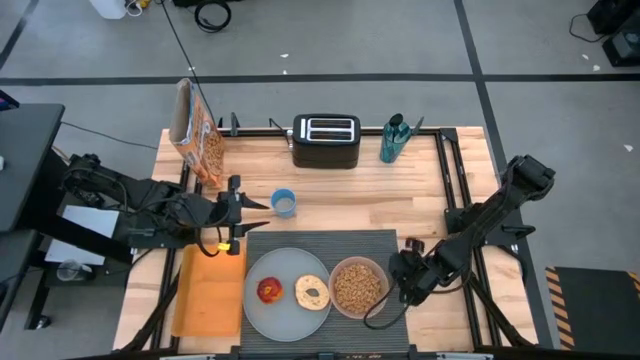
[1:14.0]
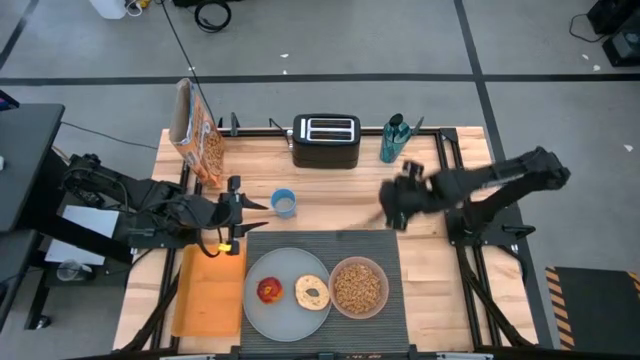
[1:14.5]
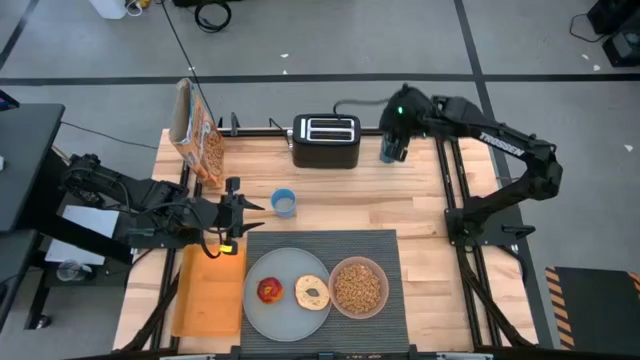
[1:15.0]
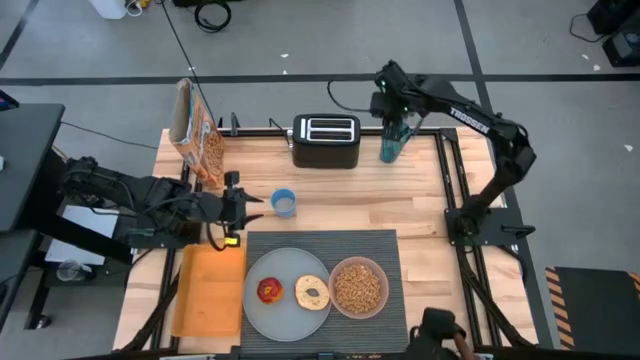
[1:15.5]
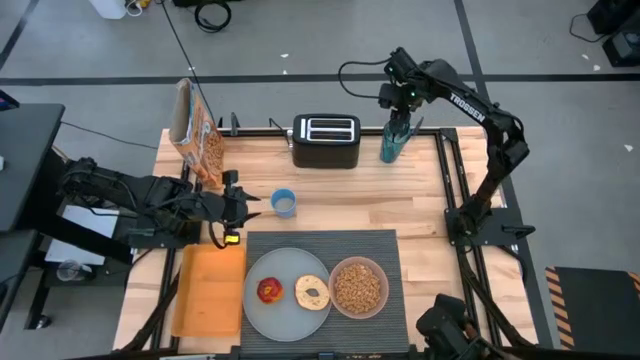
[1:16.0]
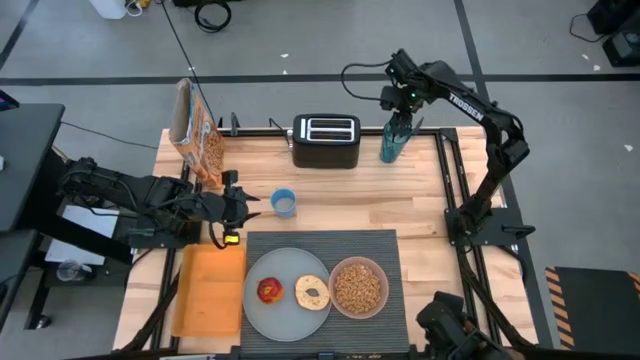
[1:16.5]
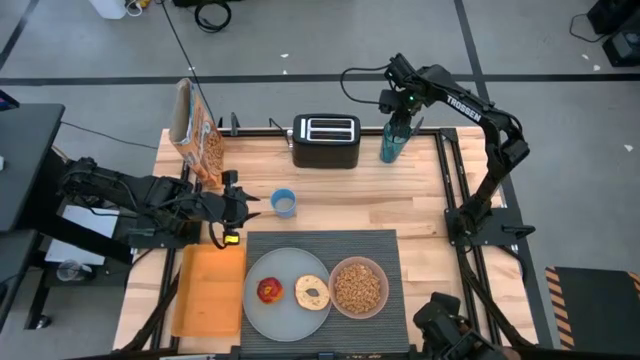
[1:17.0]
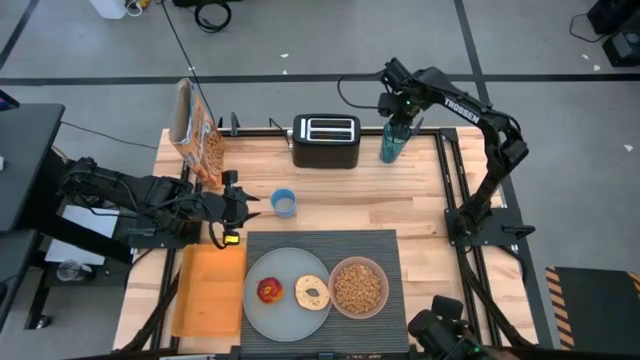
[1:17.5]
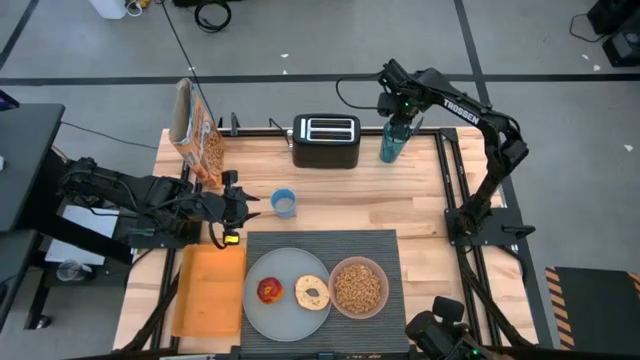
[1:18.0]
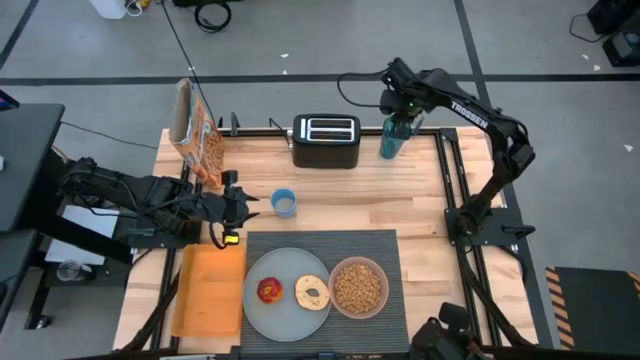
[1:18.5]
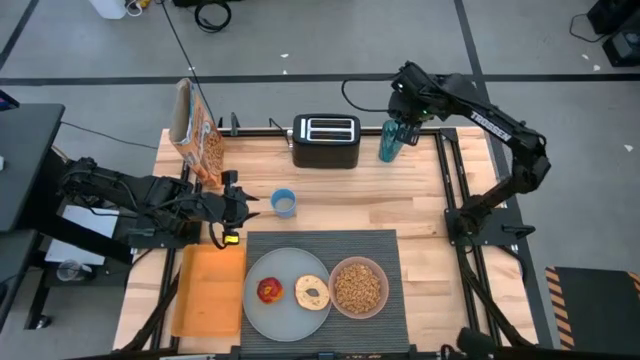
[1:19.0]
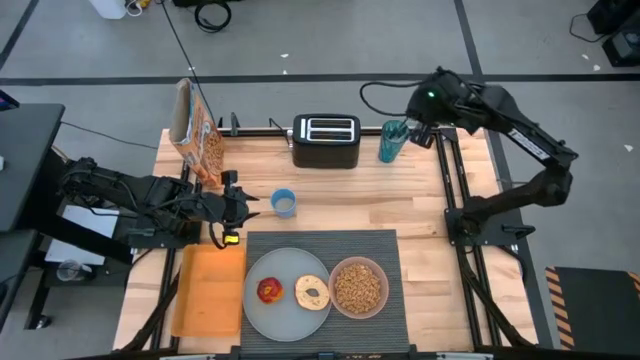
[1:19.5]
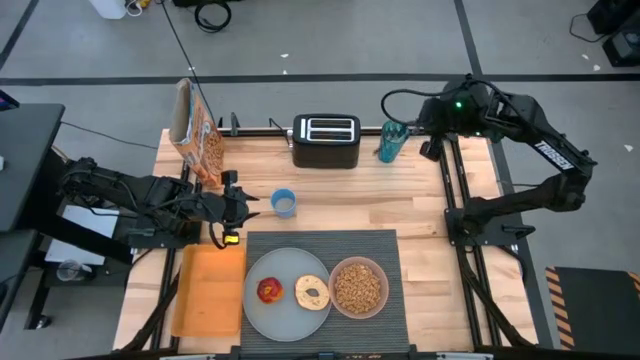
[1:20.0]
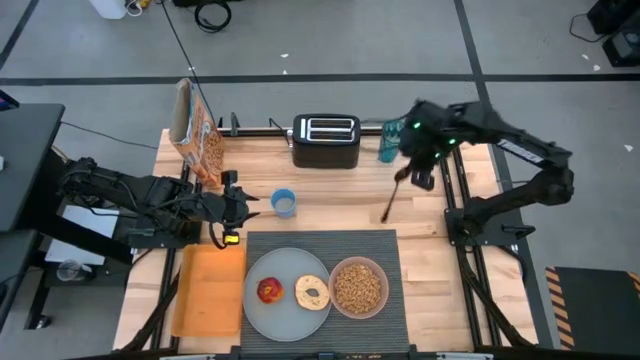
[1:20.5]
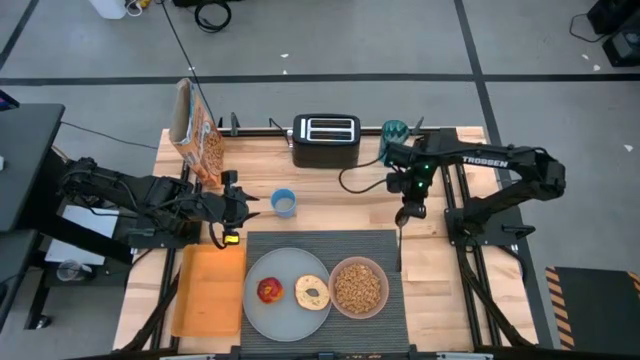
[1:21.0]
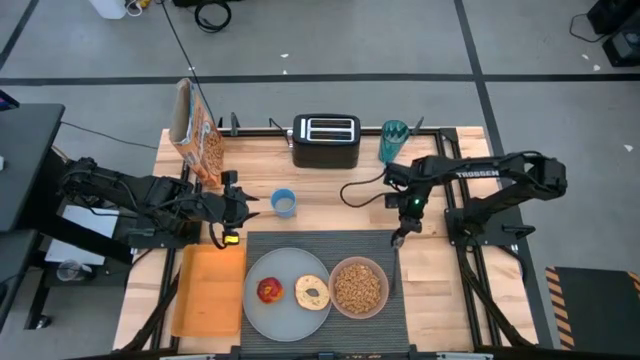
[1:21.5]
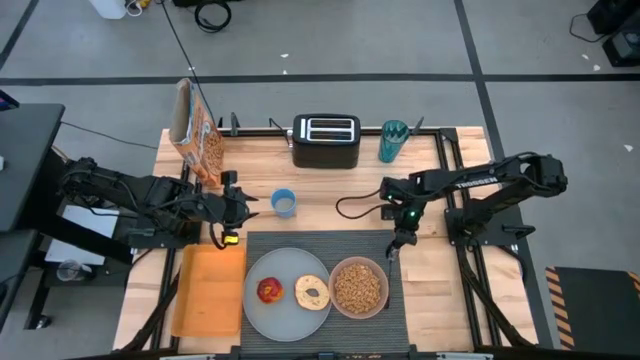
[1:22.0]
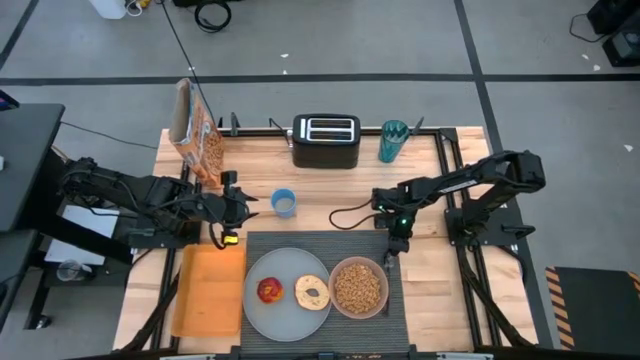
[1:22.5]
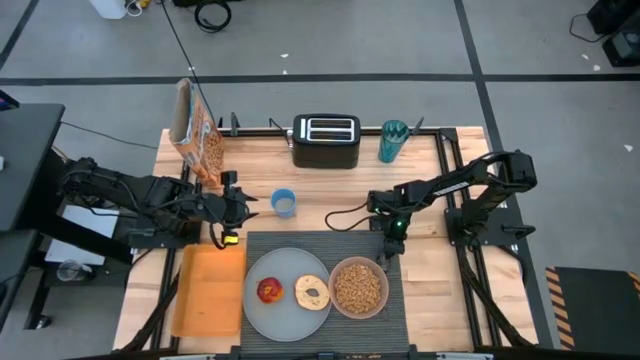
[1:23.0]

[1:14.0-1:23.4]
Task: Arrange a breakfast setting
Put the black spoon on the right of the gray table mat

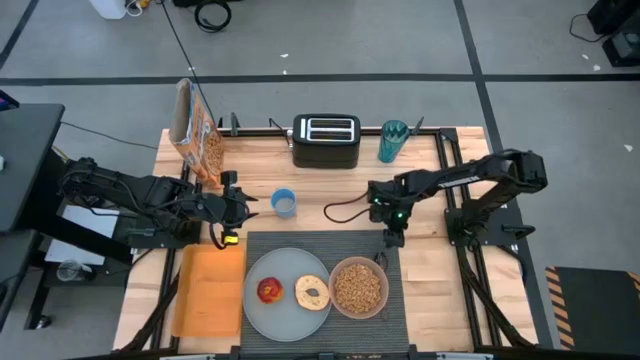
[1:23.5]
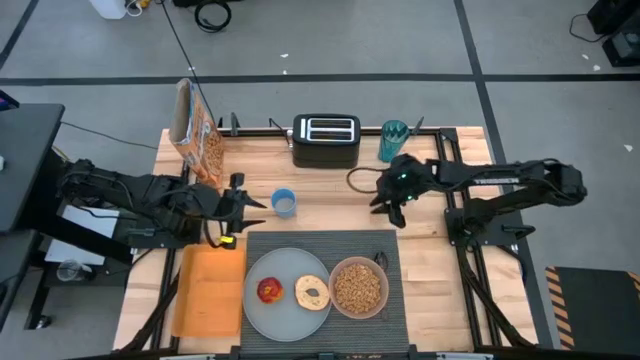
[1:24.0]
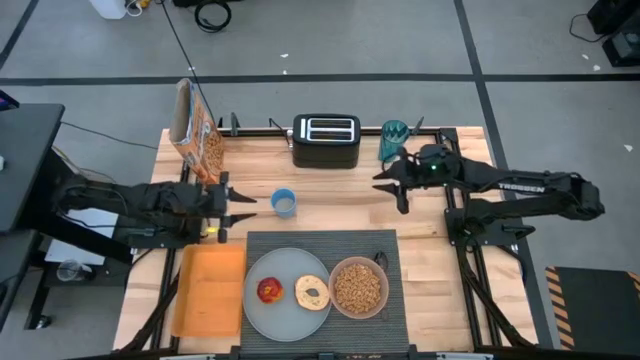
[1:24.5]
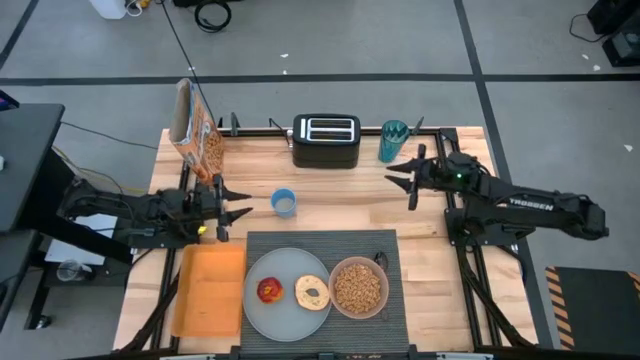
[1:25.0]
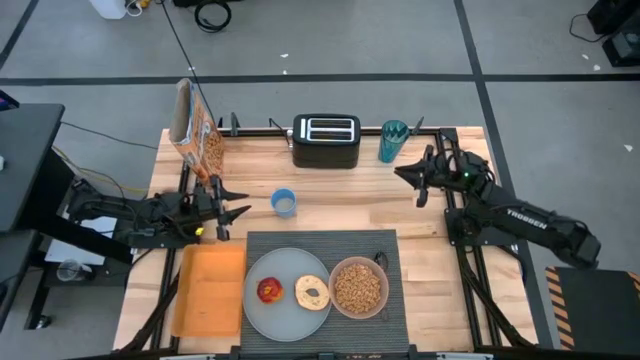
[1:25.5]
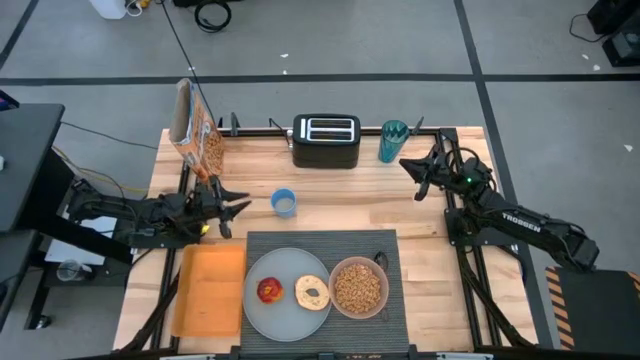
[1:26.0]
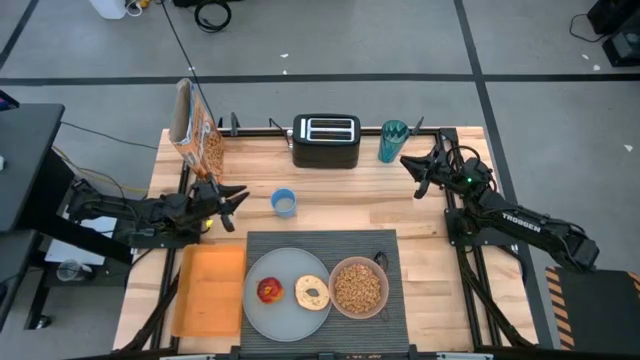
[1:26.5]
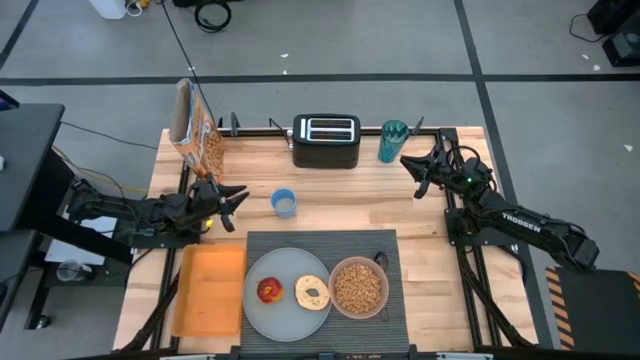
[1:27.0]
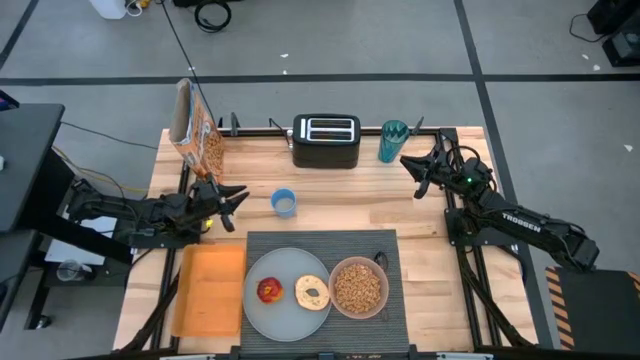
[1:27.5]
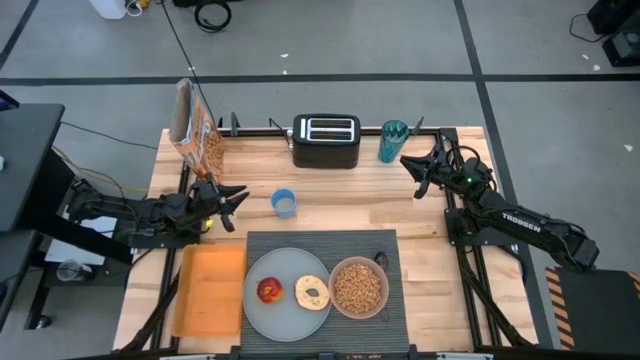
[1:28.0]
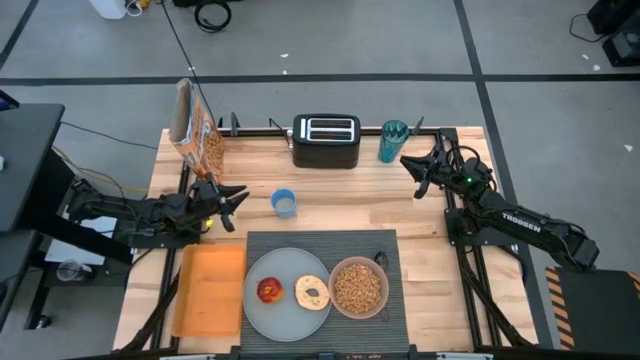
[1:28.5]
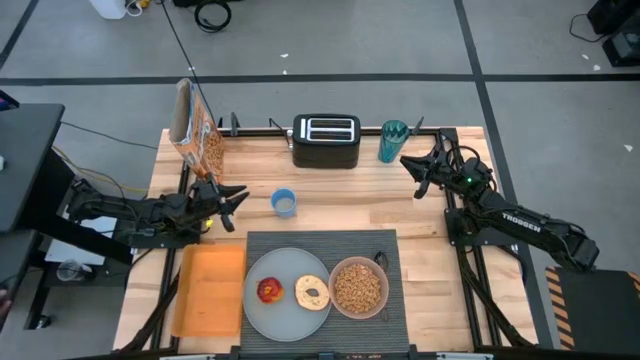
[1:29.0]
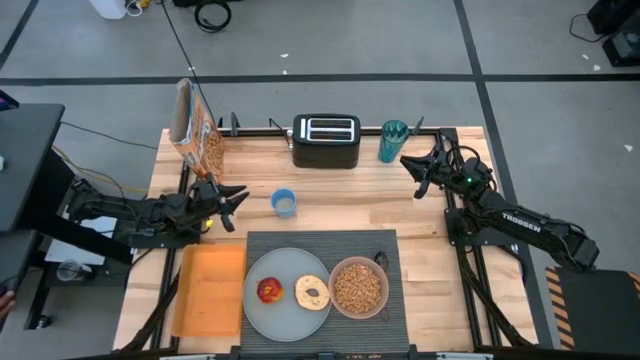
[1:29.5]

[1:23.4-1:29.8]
Return to Home Position

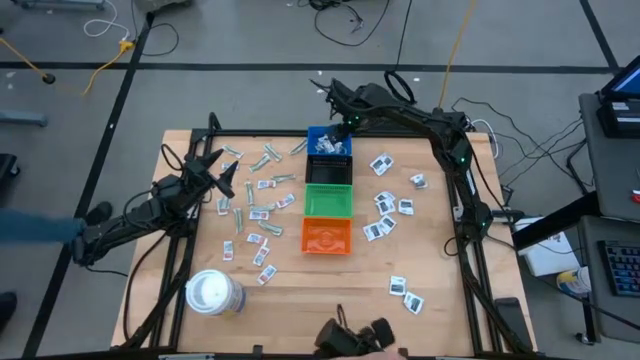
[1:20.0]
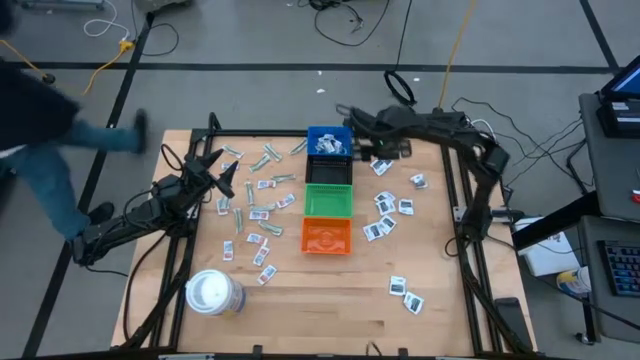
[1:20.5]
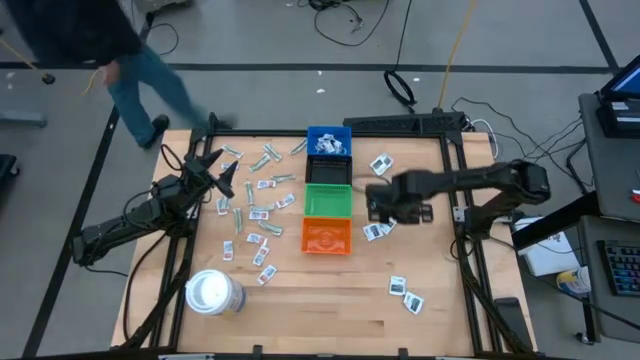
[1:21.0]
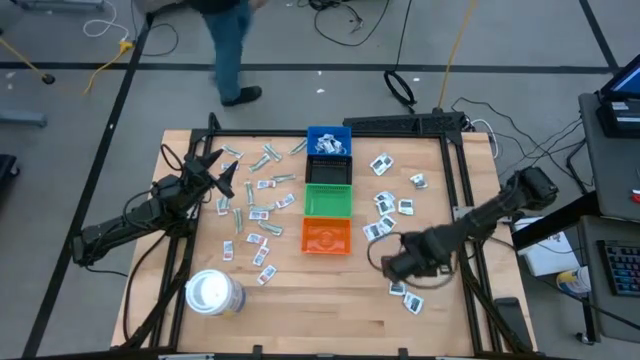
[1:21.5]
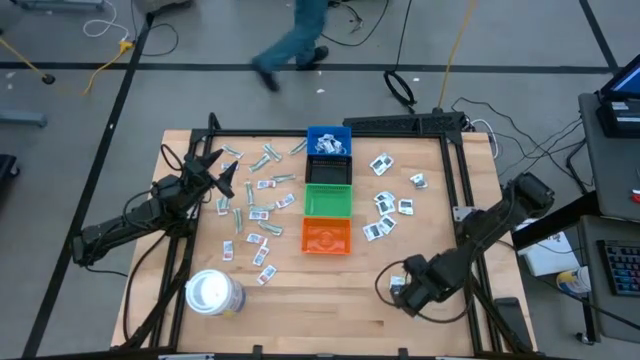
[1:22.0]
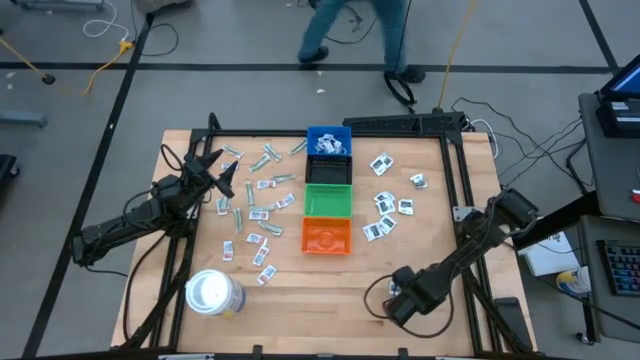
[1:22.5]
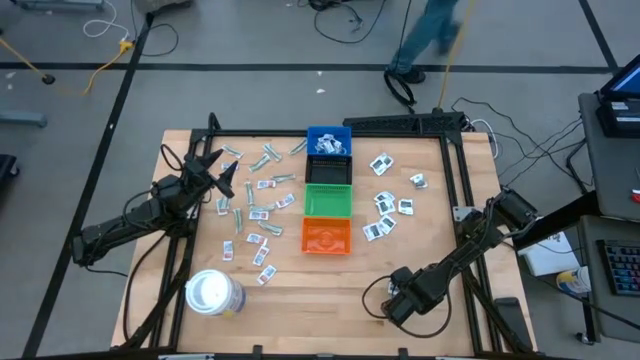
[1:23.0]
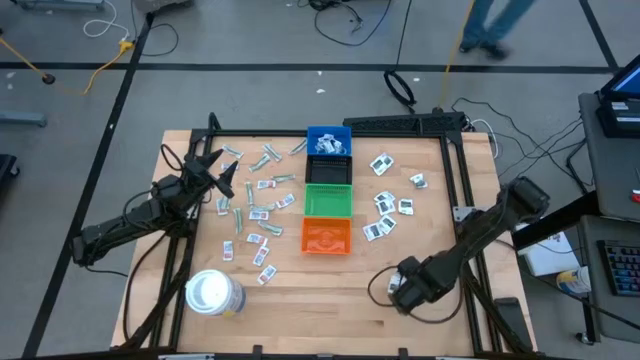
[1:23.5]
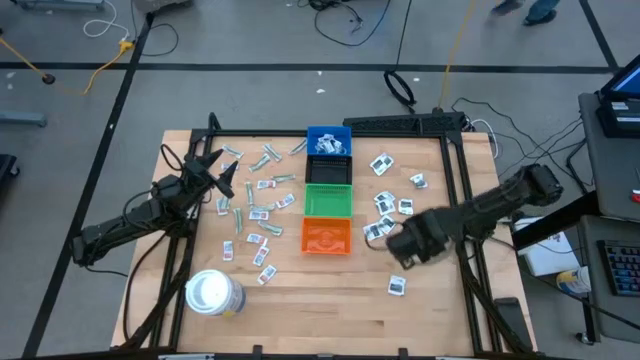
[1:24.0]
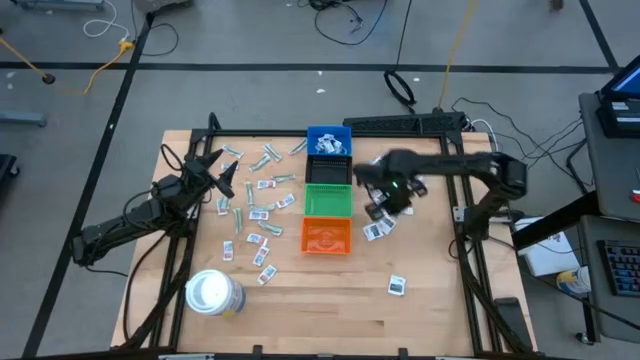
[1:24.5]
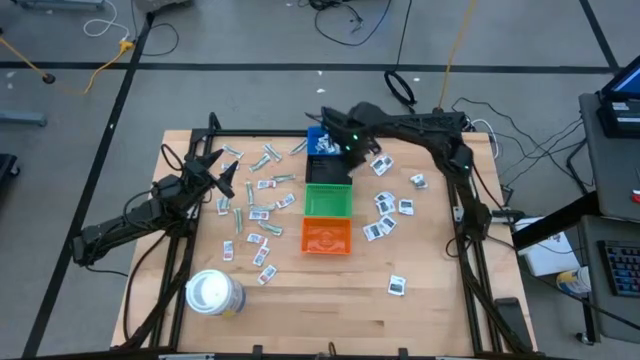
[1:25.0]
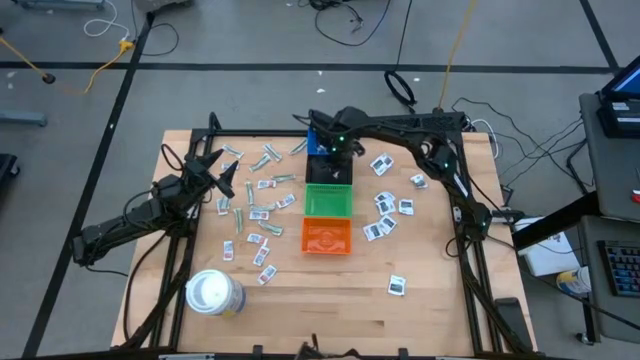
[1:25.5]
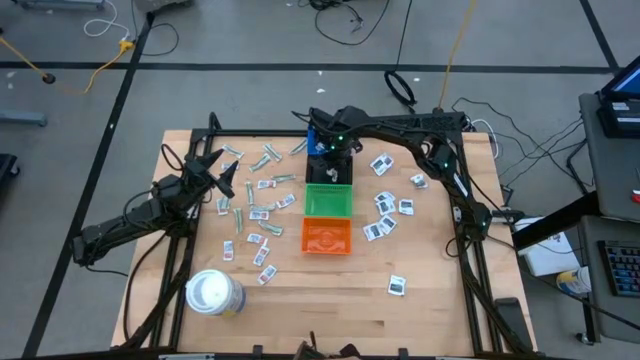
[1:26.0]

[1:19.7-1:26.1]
Task: Pick & Place First Aid Supplies
Put the black towelette pack into the black bin
